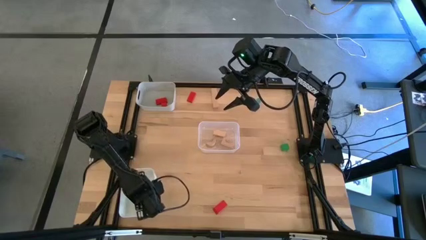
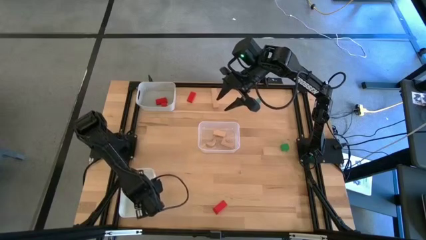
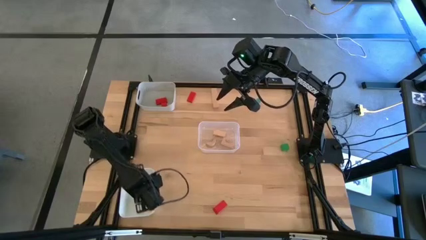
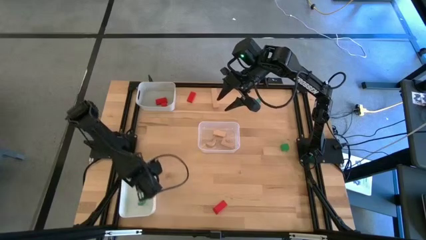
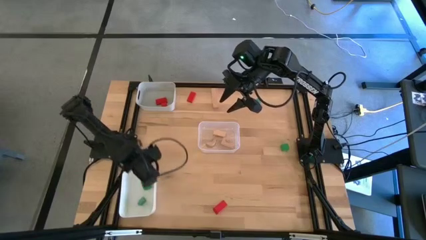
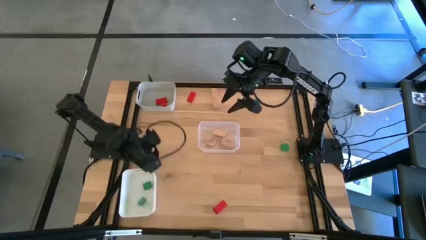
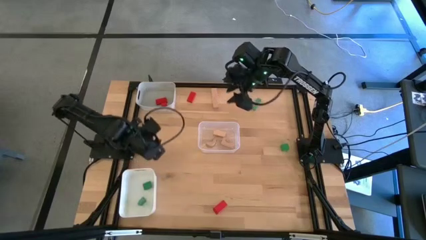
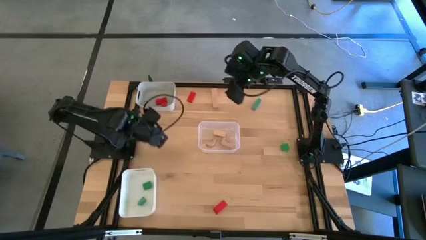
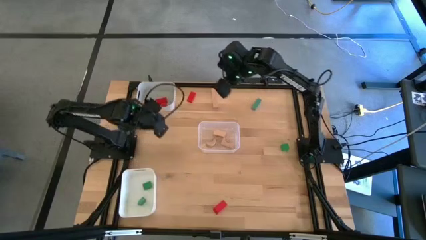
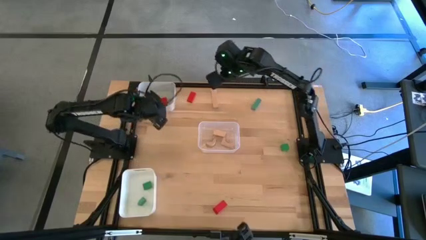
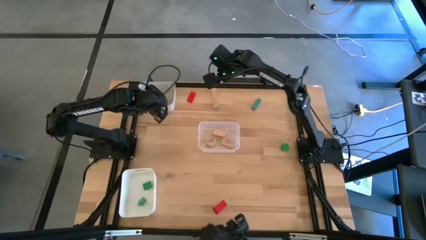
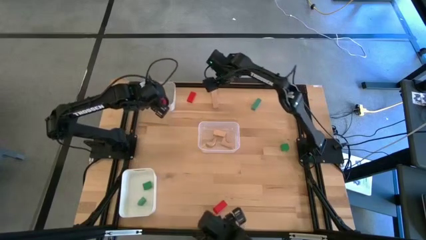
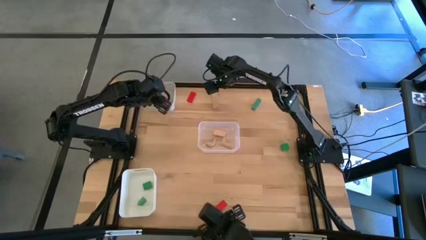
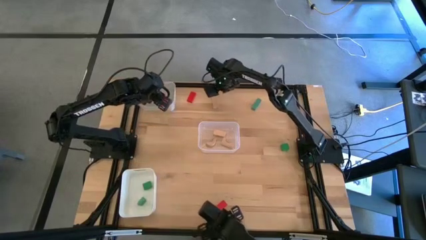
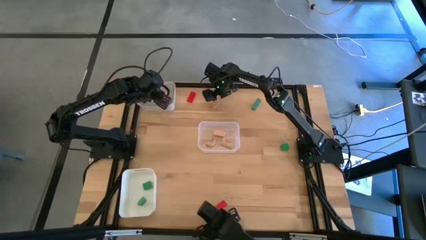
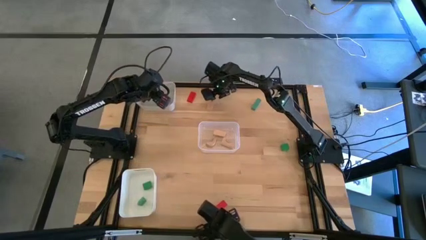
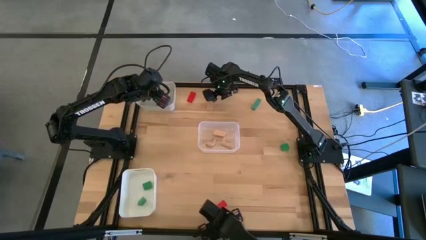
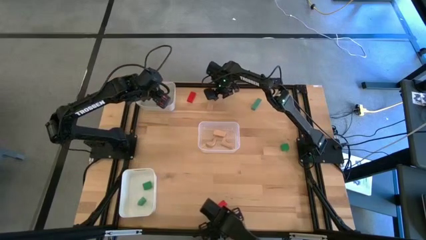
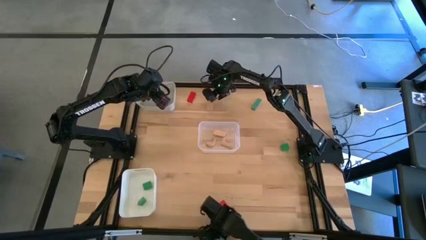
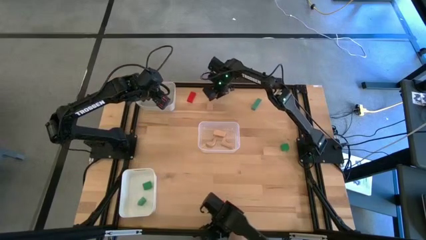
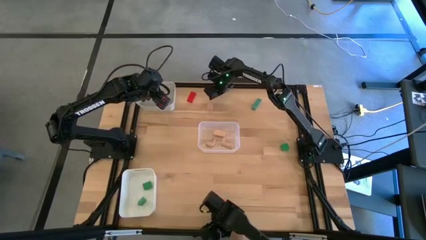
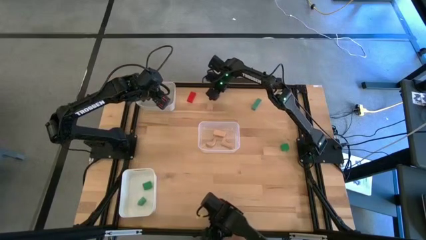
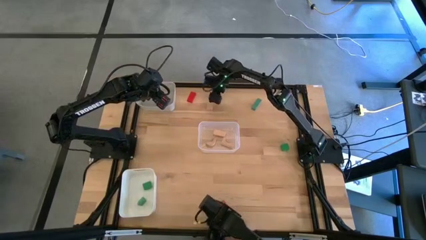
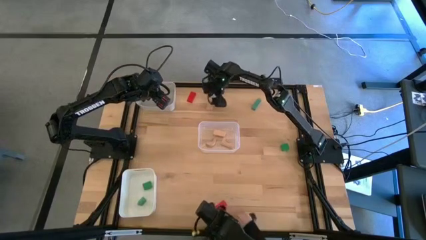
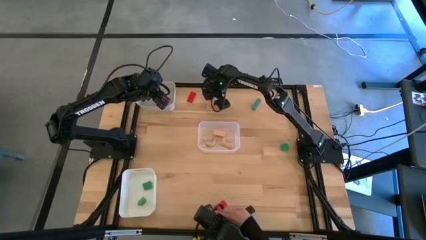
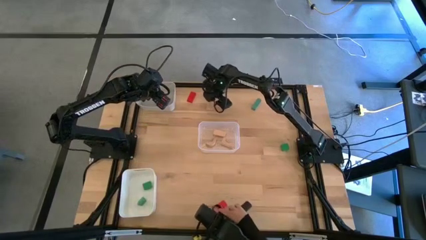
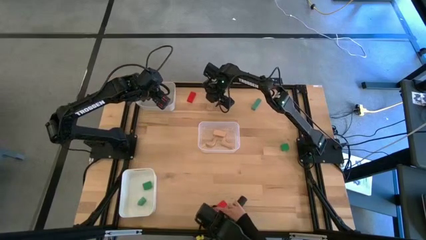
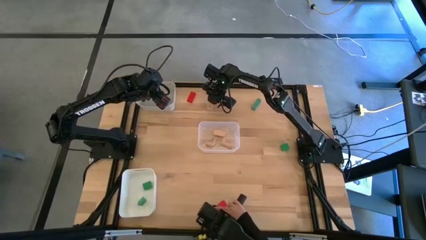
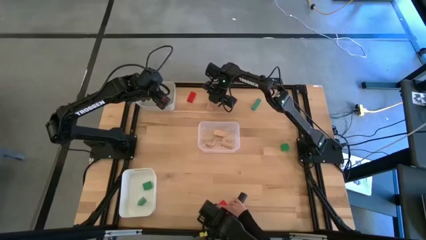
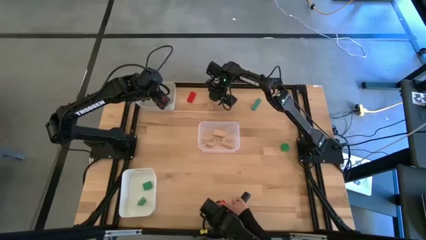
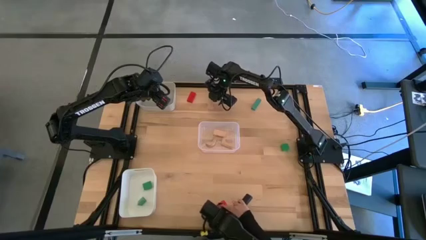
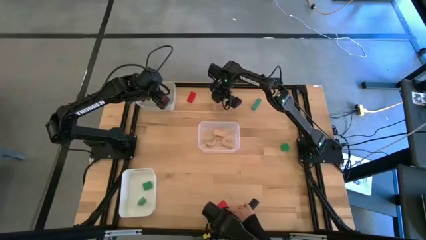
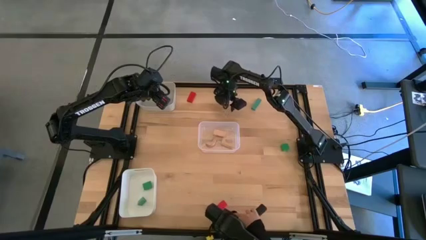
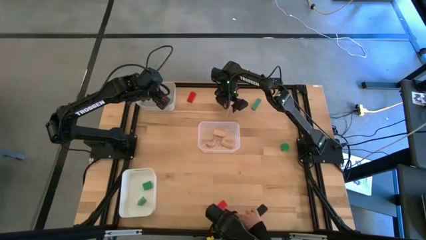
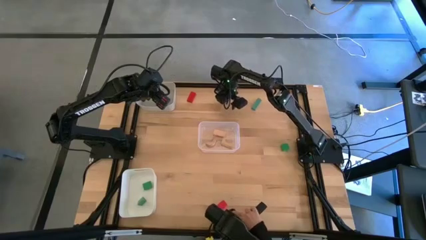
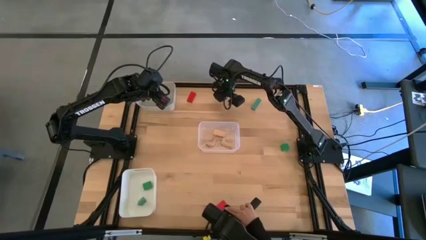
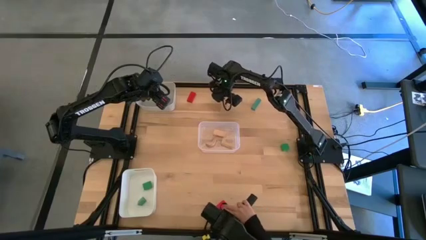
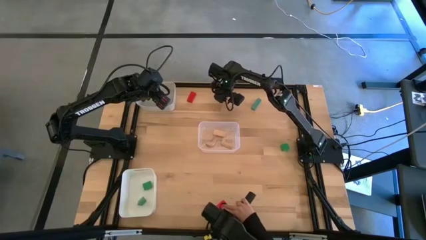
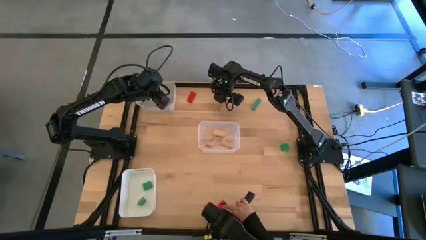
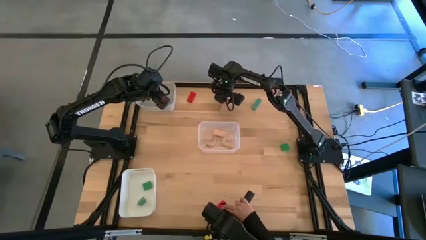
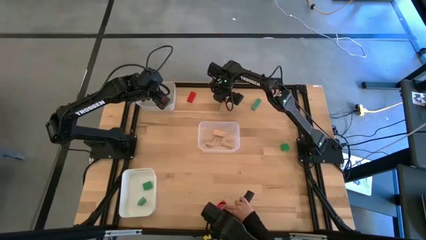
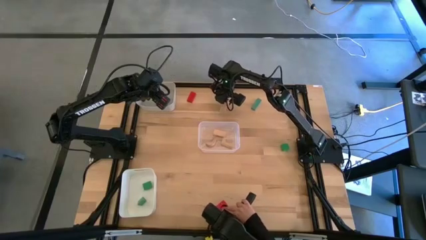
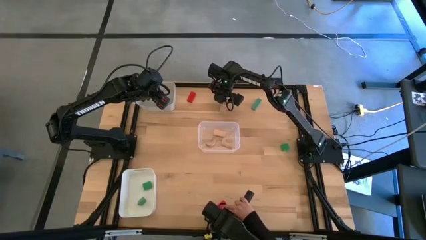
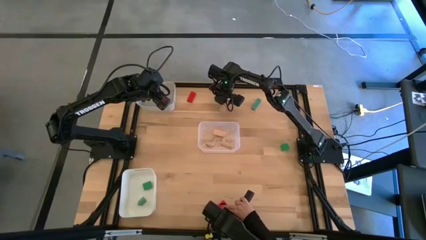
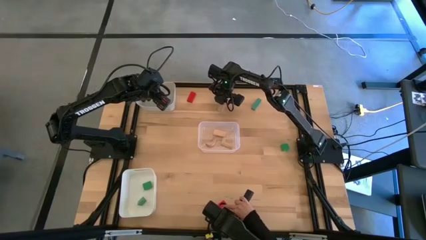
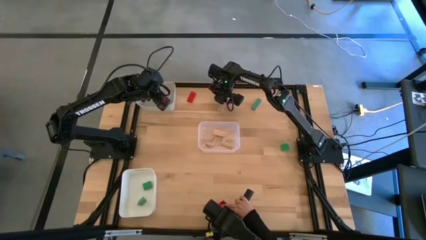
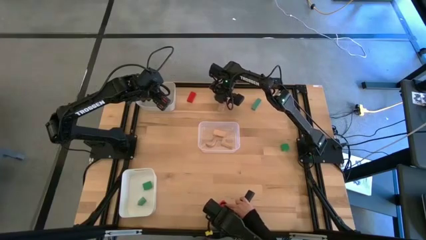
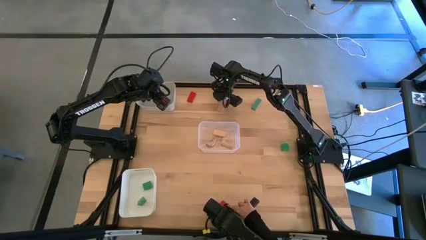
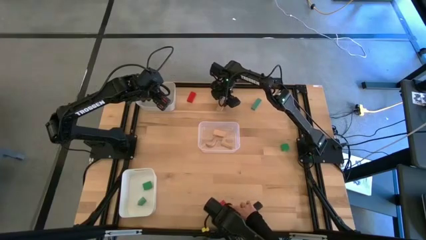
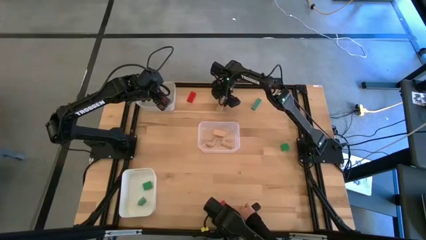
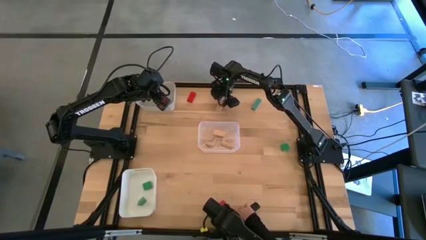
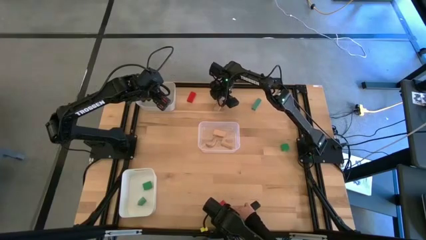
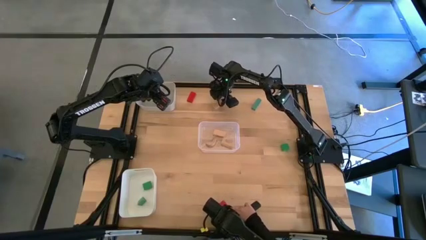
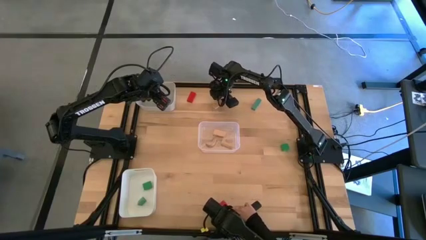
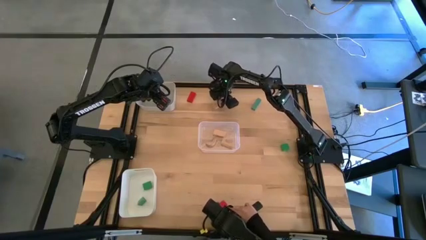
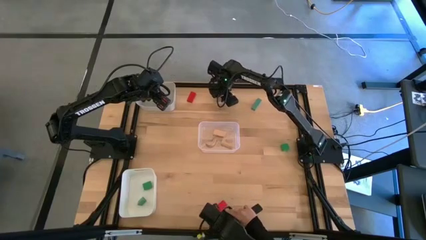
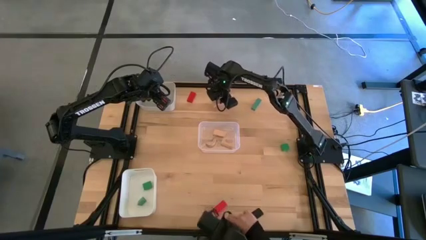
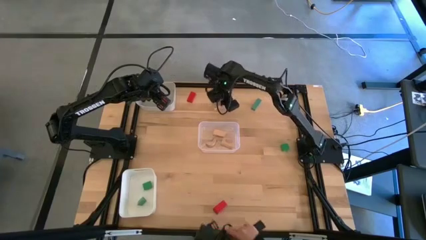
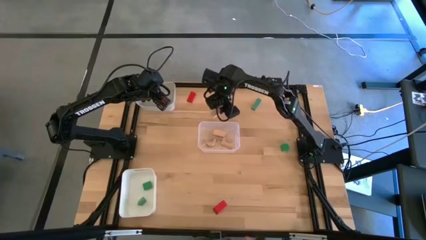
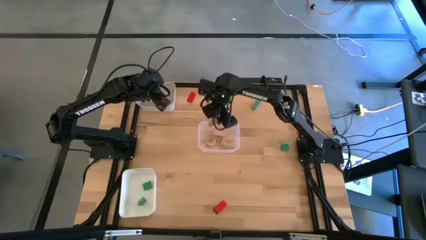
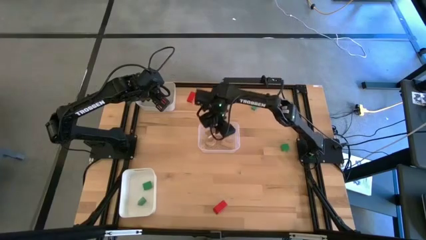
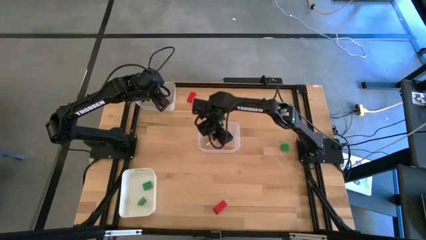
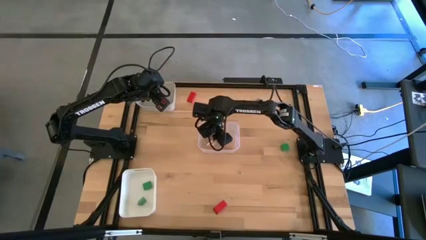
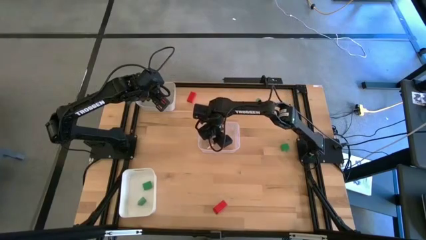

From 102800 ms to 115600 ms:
Task: Sort & place blocks by color
Put the brown block into the transparent bin

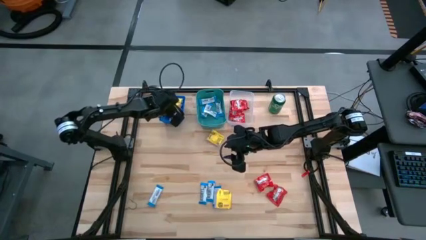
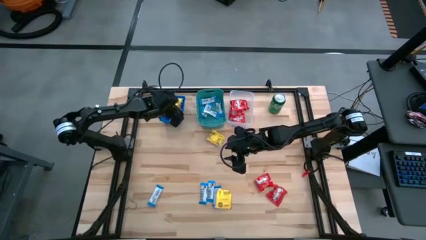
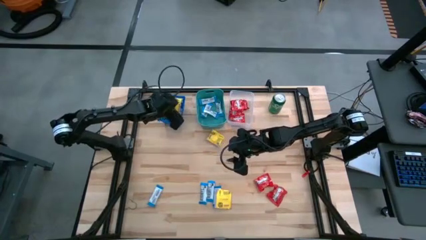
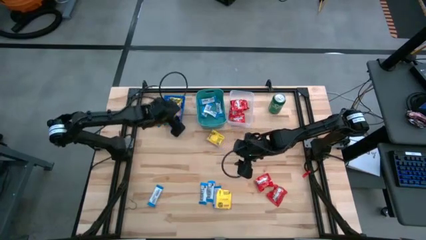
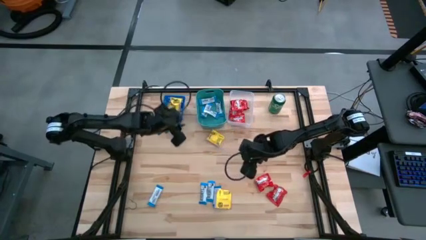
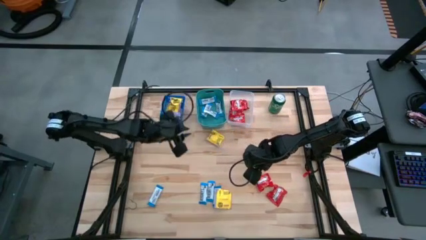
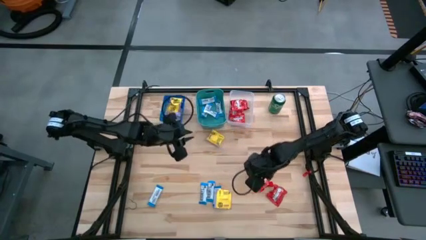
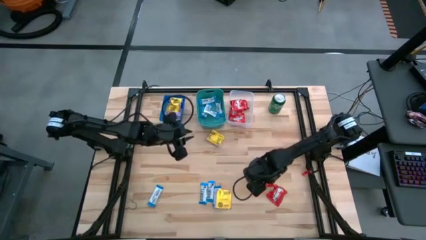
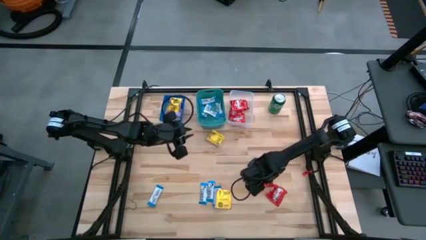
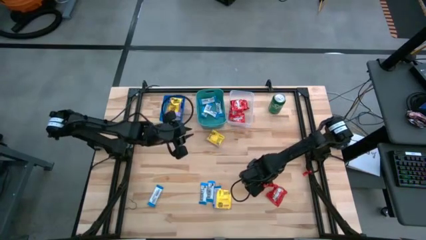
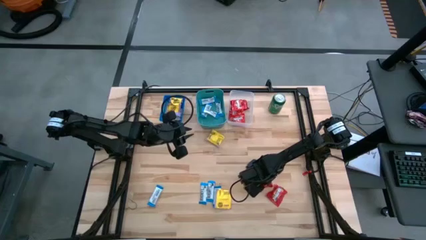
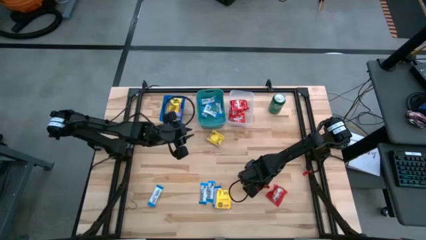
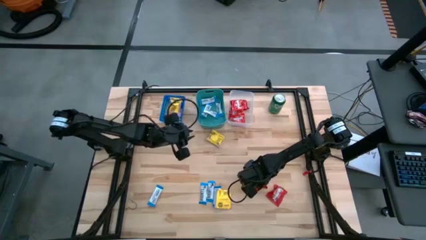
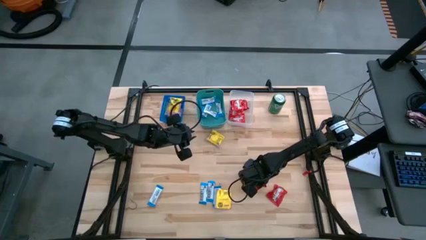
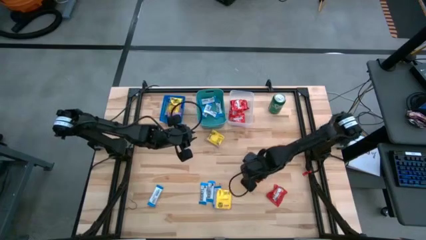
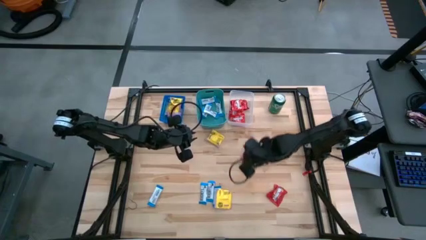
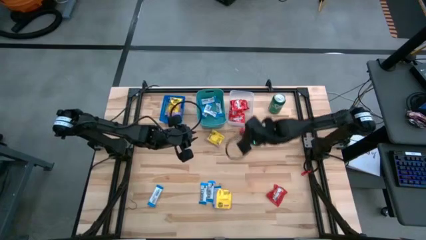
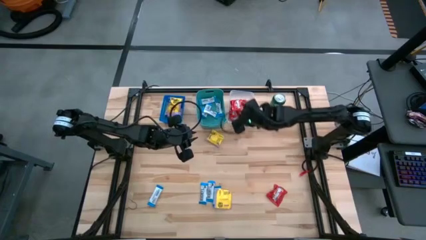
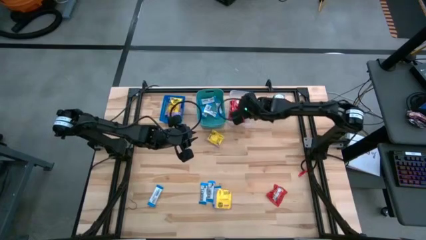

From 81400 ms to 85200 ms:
Task: Sort candy
Put the red candy into the transparent bin
